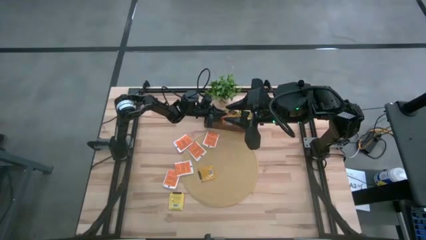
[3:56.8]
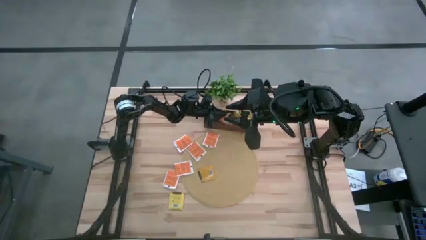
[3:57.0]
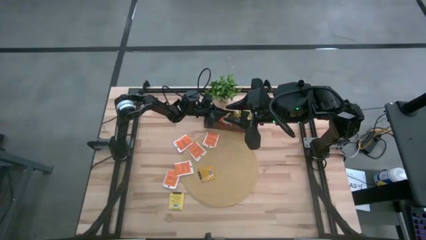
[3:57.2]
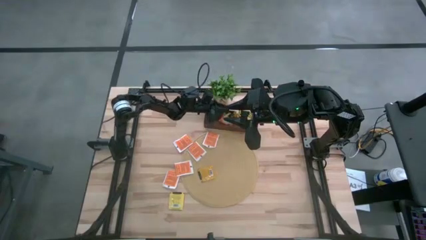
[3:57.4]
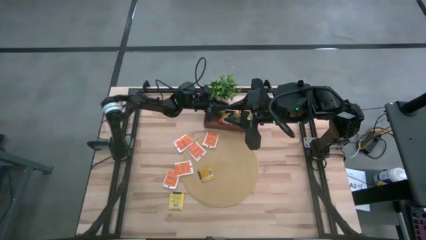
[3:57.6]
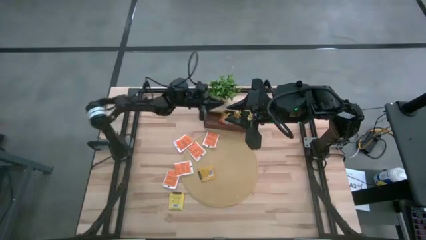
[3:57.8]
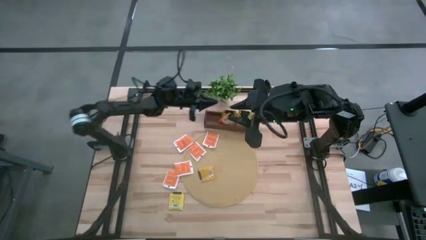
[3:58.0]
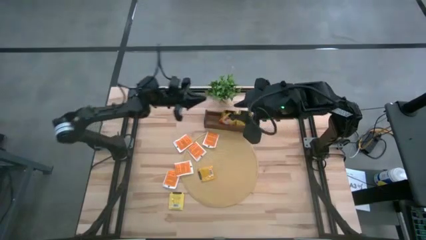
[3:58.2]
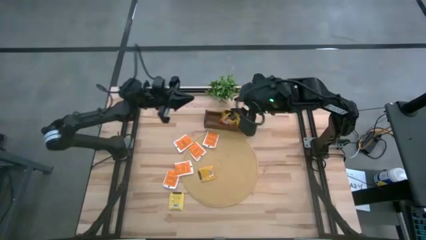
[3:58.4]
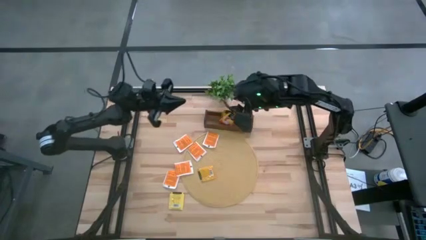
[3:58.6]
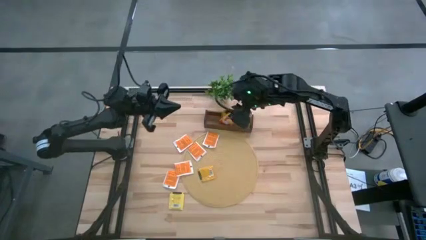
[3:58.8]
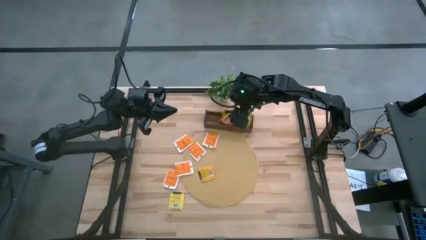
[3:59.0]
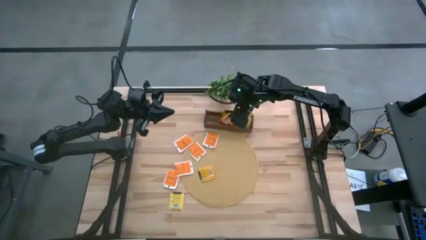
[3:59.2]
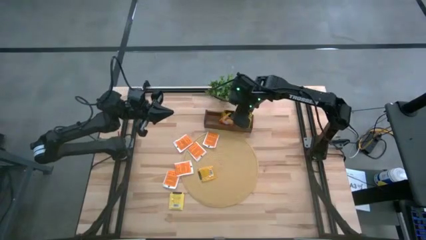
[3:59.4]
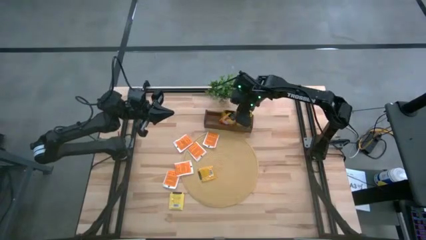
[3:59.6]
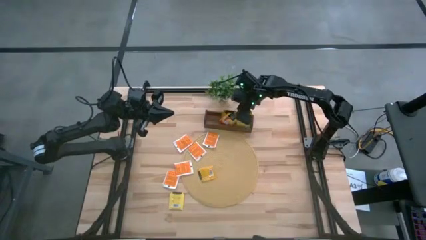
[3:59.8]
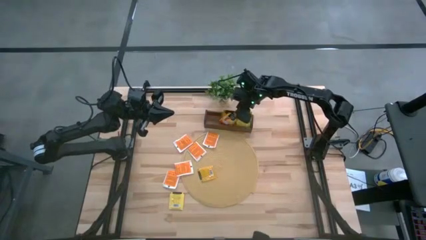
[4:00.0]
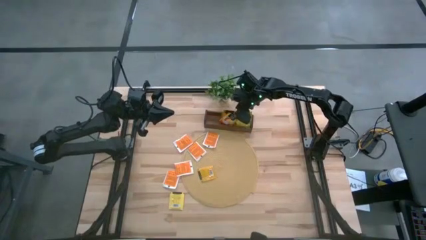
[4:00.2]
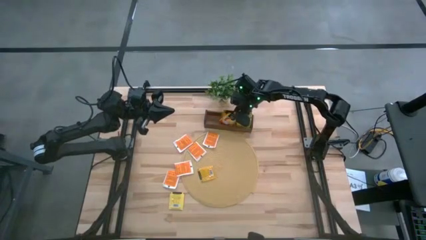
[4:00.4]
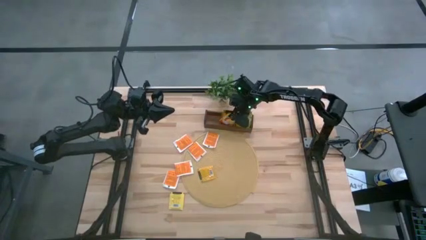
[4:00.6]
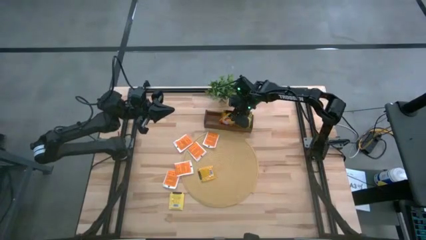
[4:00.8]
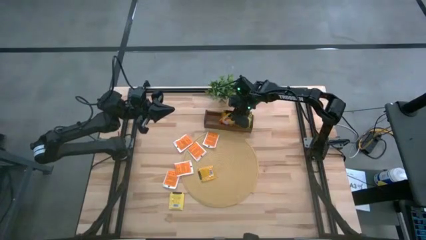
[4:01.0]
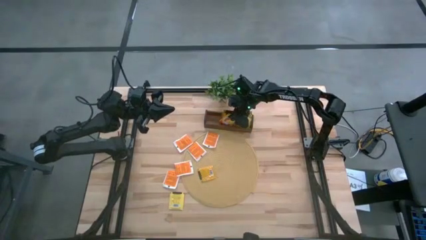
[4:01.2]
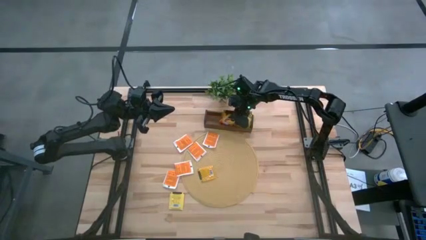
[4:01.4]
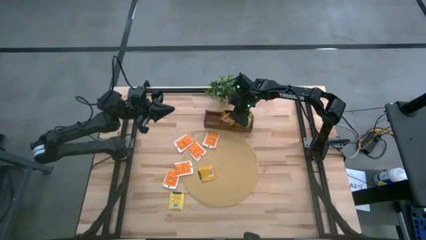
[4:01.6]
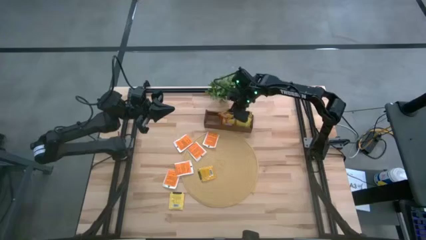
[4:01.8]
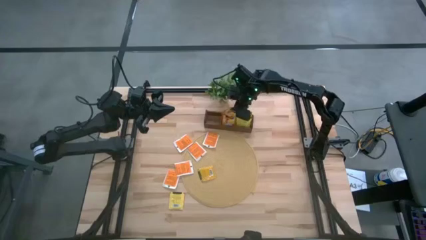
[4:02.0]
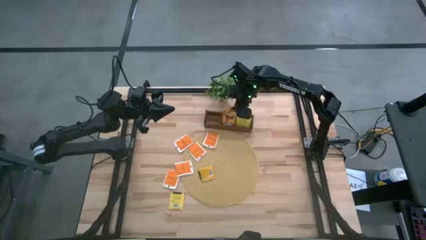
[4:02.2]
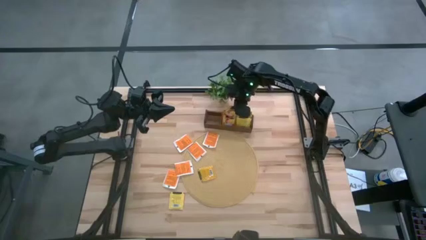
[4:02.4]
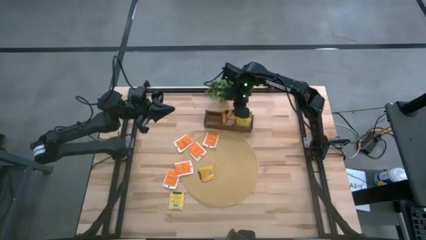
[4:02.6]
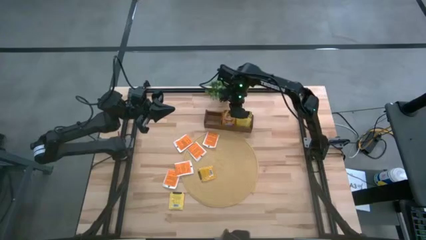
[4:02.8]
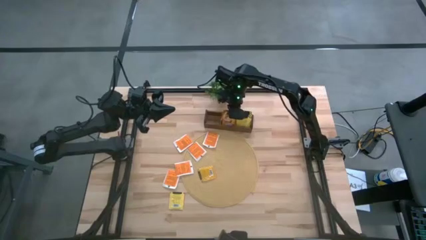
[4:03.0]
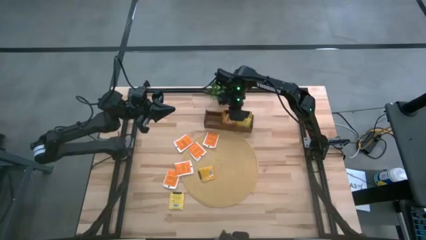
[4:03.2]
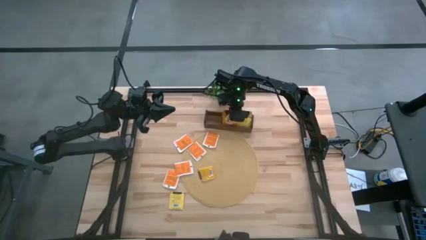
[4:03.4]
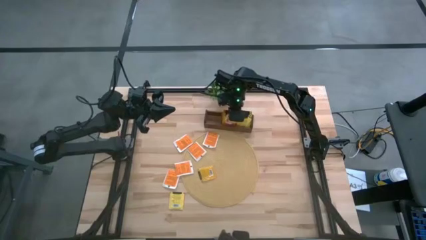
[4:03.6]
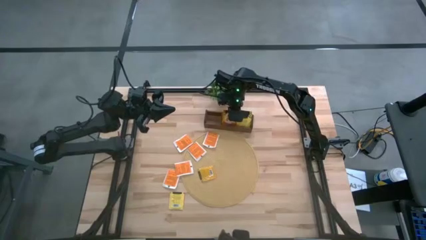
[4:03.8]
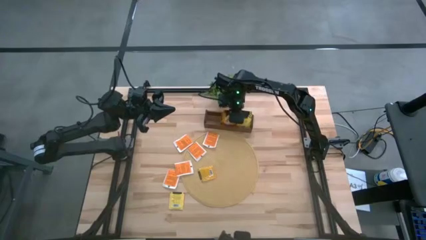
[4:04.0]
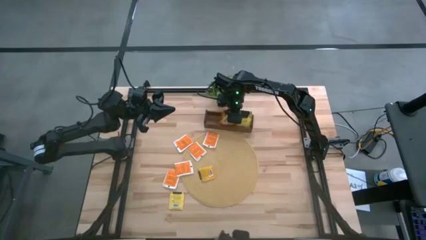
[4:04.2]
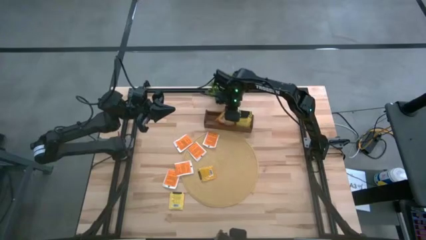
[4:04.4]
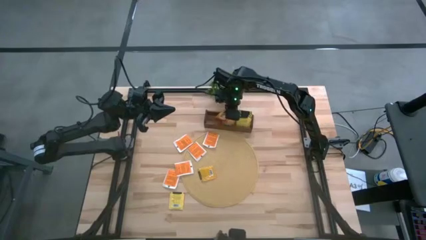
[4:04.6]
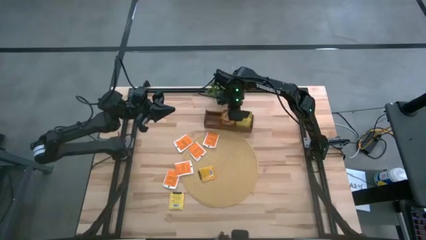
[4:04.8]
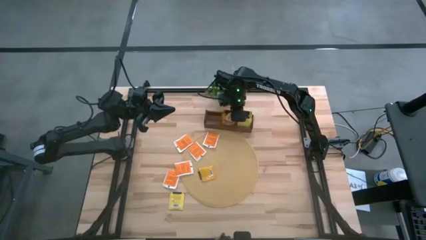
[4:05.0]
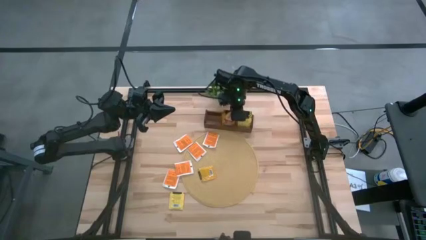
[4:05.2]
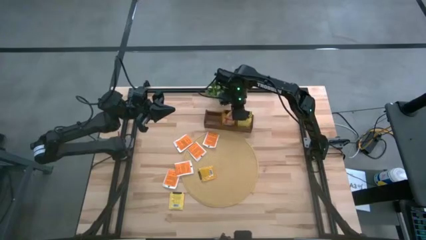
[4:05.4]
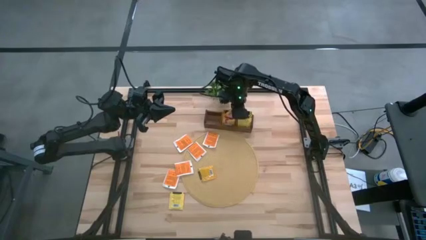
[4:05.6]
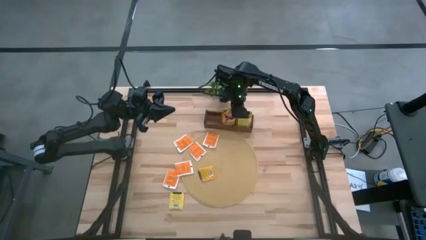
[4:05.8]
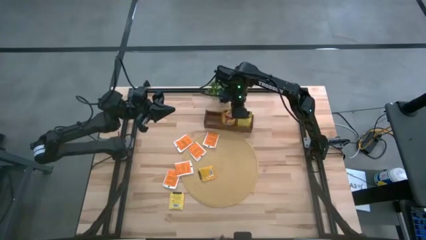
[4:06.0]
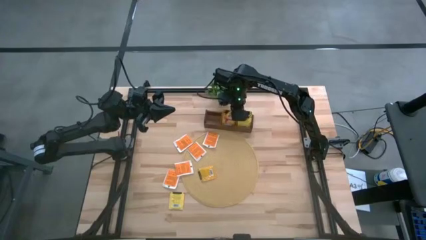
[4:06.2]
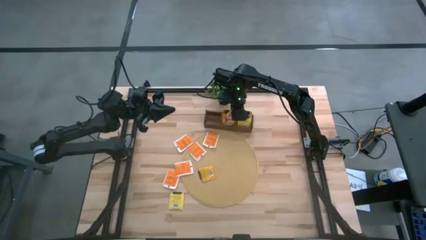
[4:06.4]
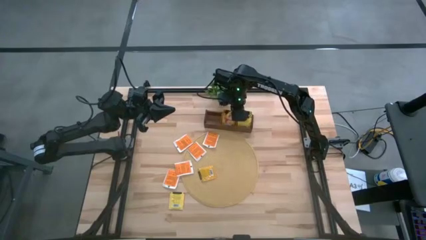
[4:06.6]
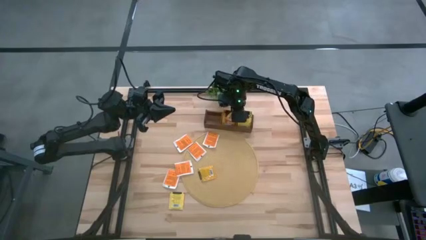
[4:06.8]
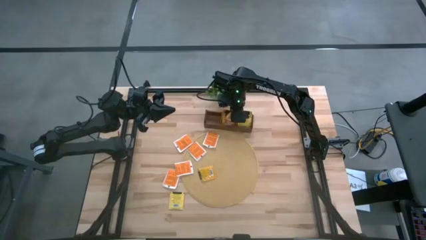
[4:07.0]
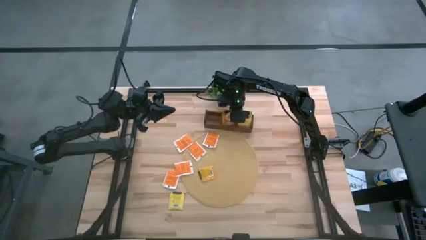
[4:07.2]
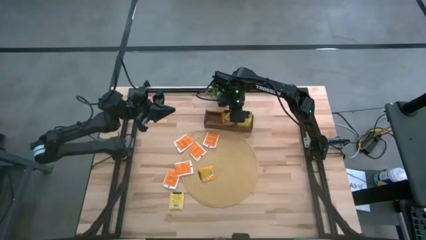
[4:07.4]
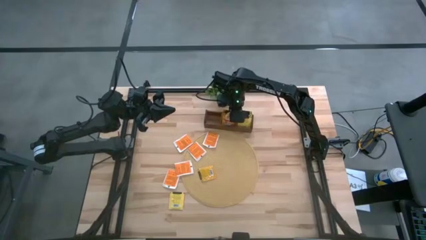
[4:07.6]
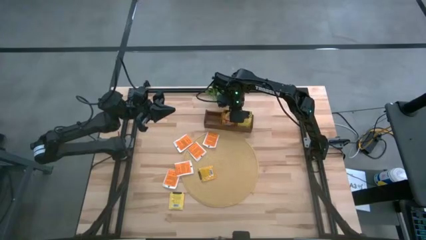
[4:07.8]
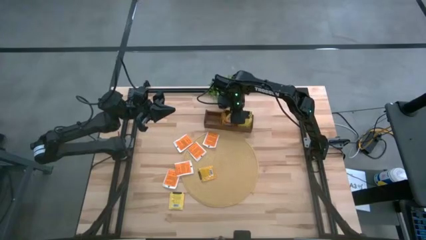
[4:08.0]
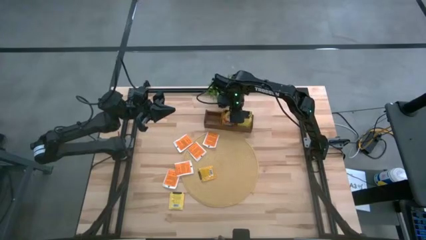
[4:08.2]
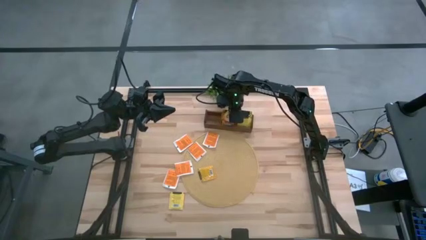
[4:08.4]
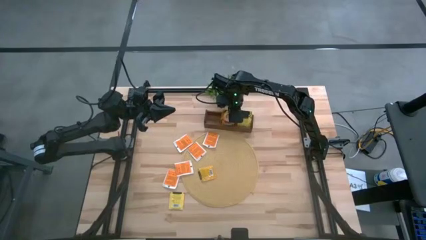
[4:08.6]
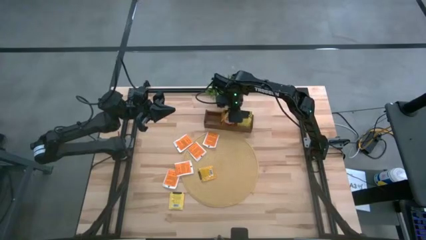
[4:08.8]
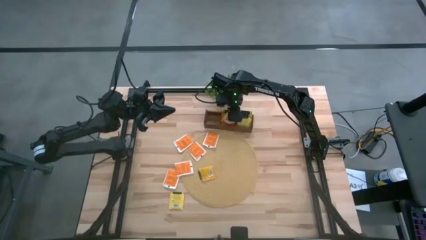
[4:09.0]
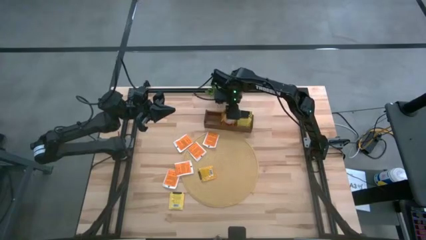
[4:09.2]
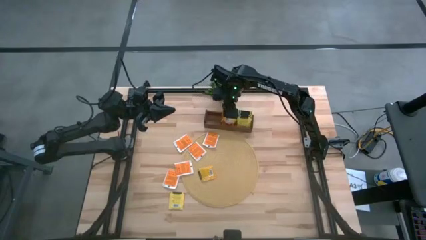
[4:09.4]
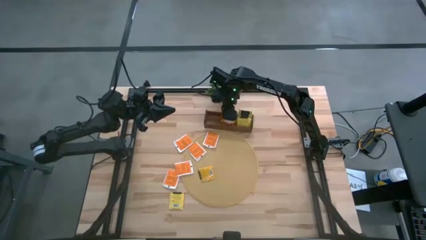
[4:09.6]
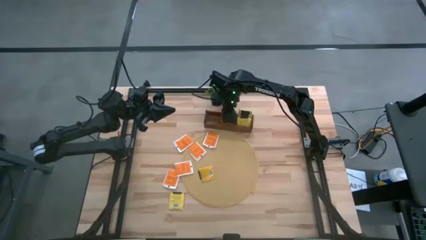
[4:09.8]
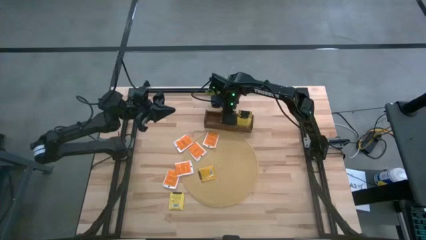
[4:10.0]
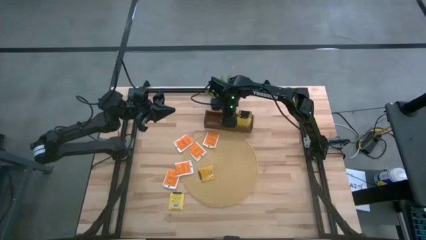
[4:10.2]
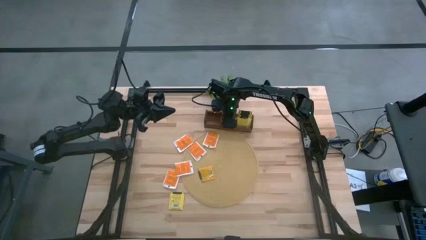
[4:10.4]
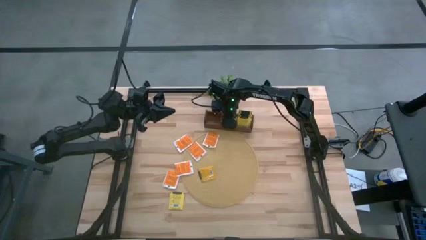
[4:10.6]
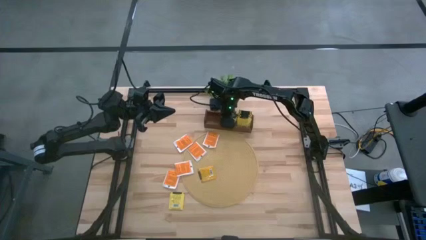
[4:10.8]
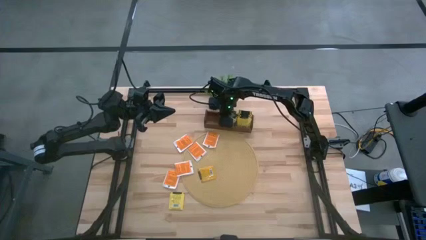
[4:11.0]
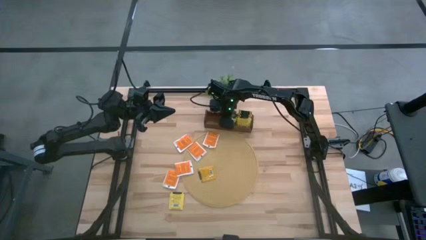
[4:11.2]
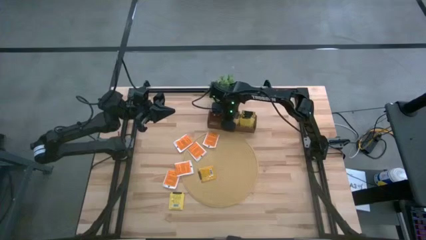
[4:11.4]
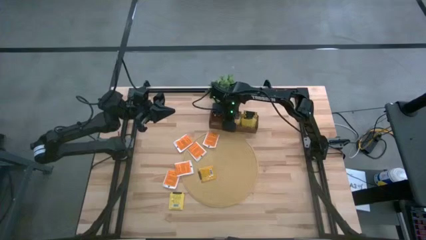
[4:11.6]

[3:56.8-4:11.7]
Task: Pick & Place Tea
Put the orange tea bag into the middle section of the wooden organizer

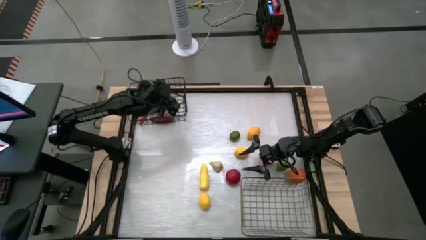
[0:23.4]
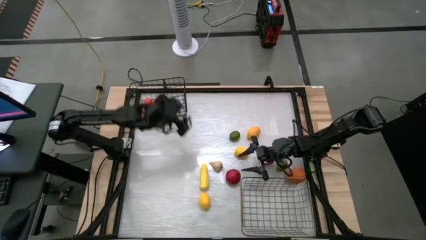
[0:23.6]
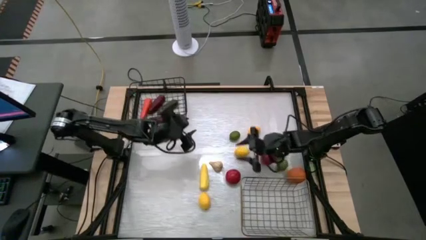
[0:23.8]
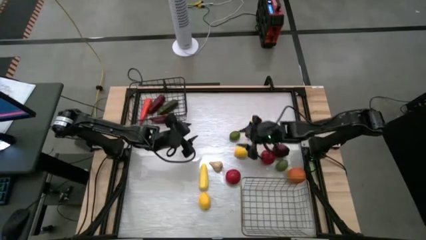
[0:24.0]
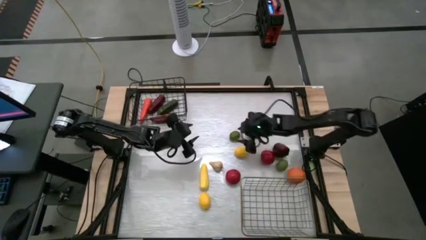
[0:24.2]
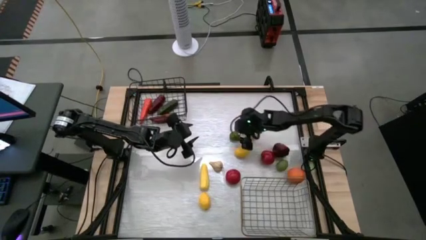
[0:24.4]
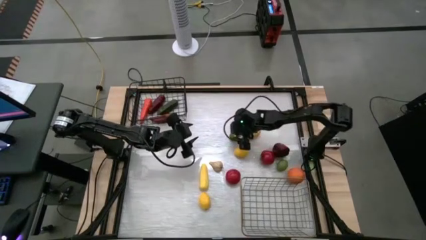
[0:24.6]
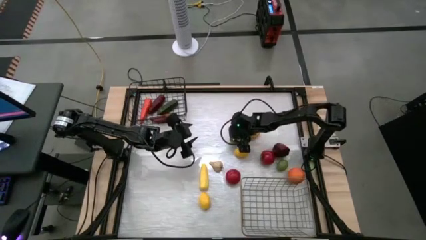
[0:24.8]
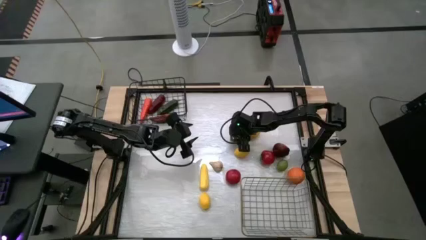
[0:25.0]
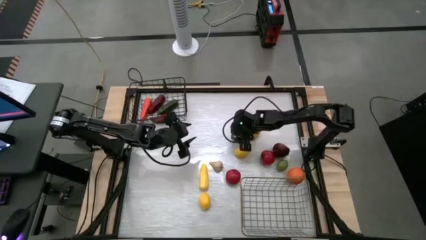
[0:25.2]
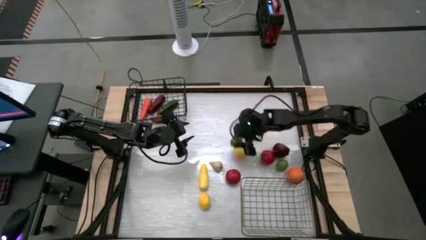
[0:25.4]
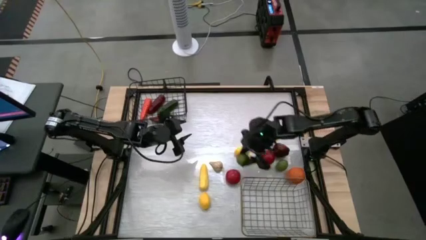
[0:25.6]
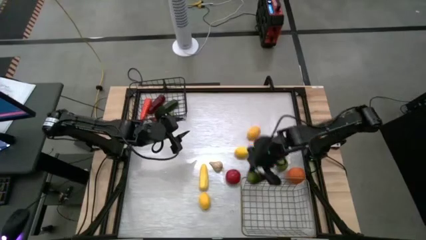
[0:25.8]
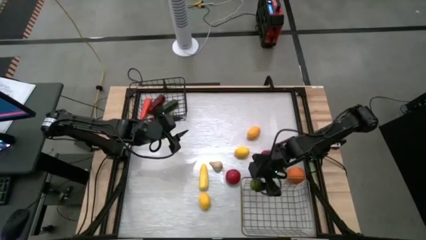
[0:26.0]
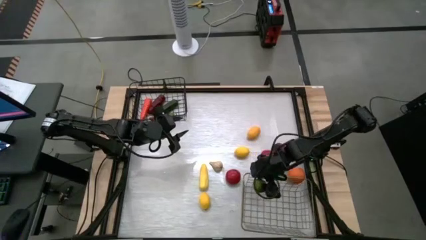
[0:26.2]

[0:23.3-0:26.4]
Task: Sort produce into baskets
Put the top lime into the gold wire basket
